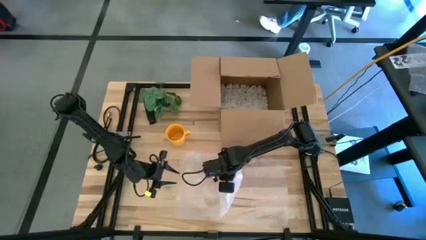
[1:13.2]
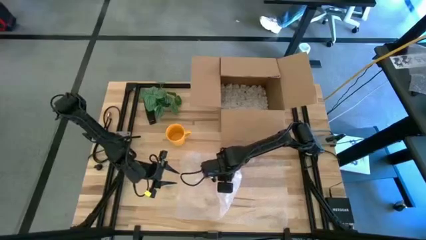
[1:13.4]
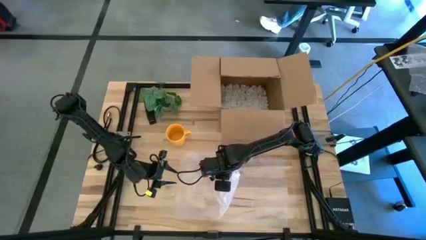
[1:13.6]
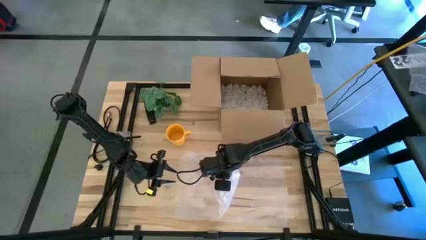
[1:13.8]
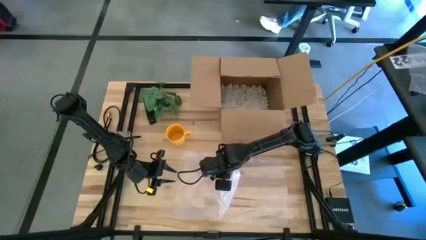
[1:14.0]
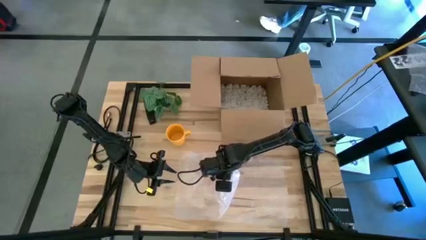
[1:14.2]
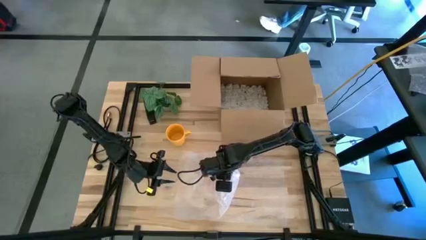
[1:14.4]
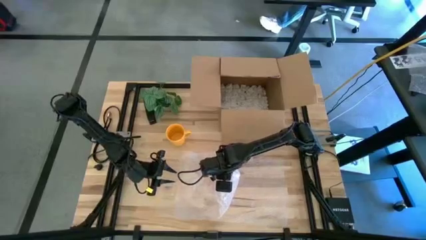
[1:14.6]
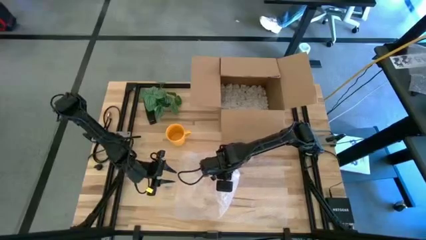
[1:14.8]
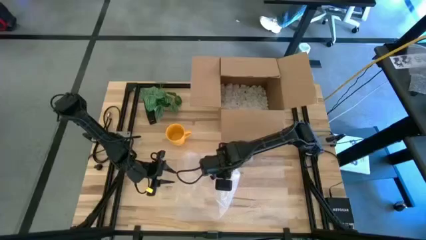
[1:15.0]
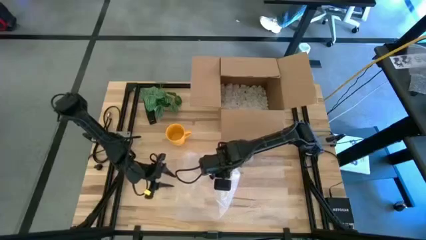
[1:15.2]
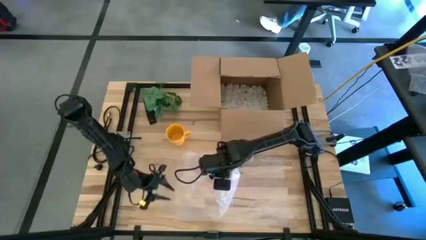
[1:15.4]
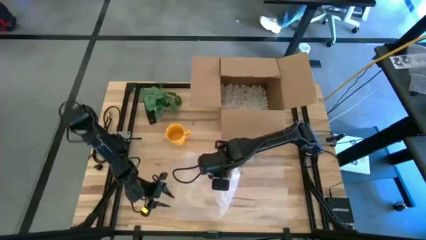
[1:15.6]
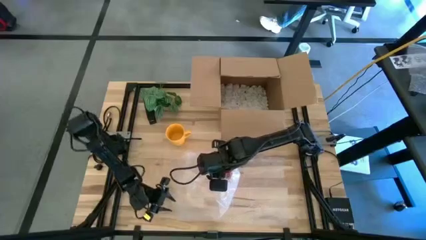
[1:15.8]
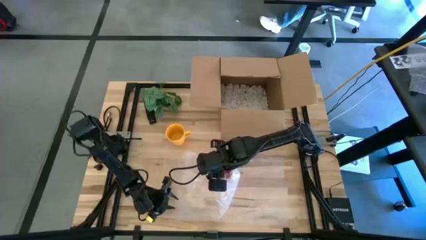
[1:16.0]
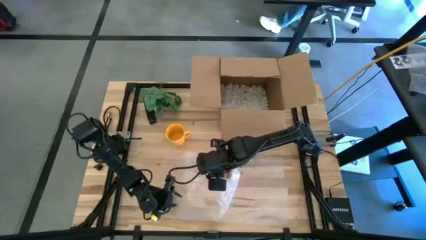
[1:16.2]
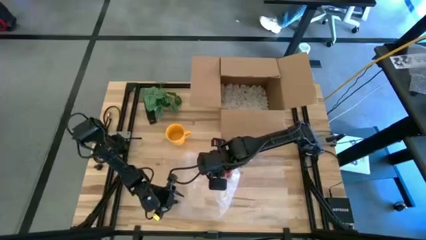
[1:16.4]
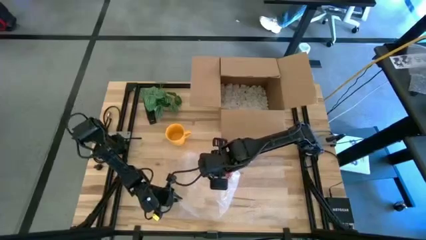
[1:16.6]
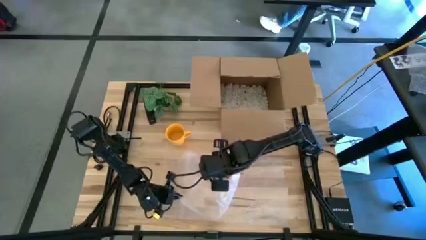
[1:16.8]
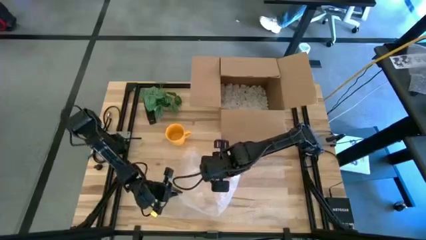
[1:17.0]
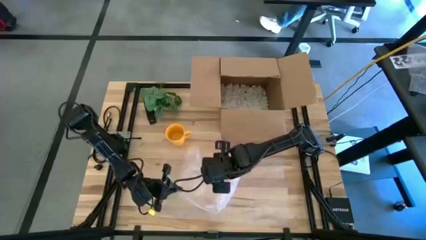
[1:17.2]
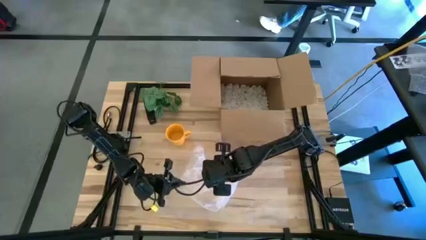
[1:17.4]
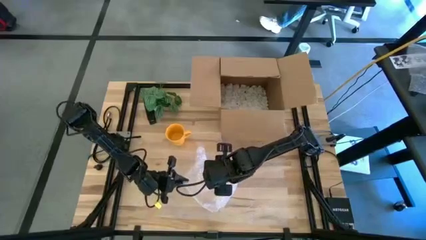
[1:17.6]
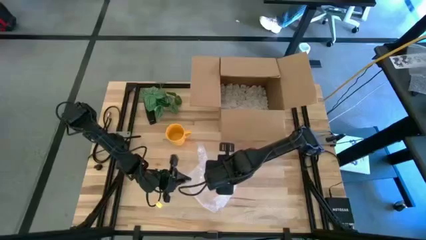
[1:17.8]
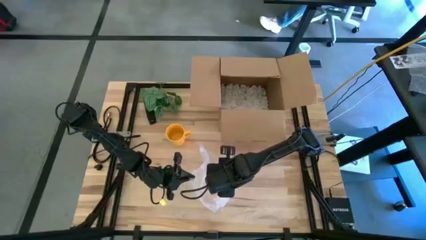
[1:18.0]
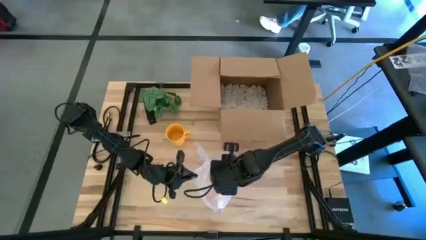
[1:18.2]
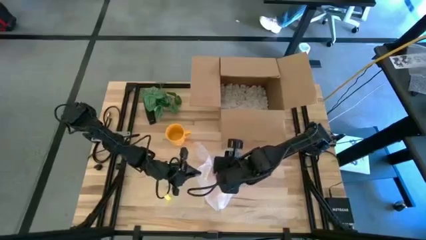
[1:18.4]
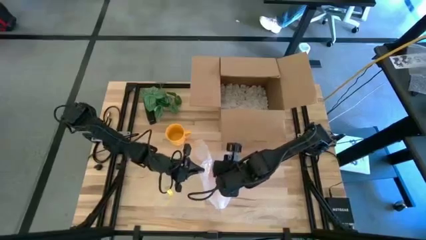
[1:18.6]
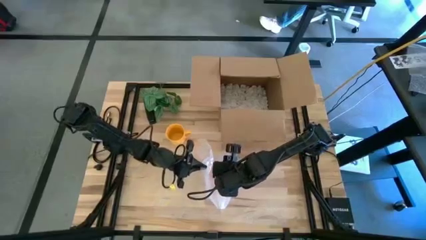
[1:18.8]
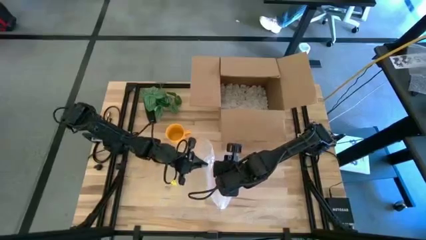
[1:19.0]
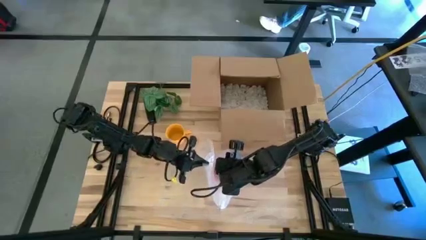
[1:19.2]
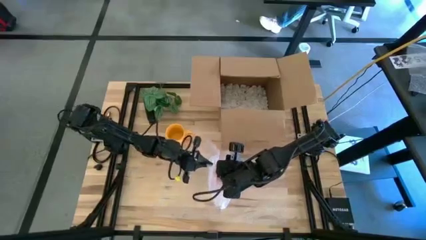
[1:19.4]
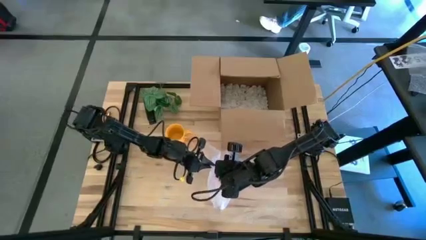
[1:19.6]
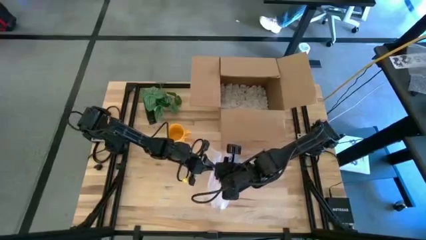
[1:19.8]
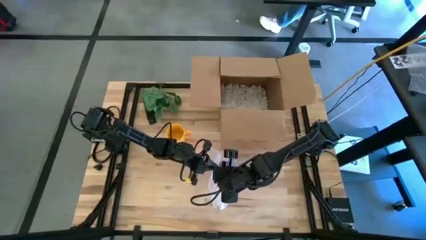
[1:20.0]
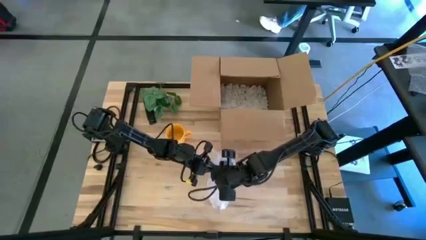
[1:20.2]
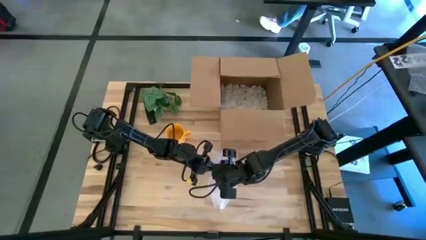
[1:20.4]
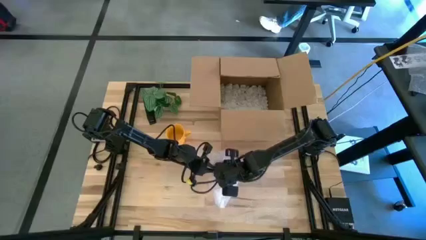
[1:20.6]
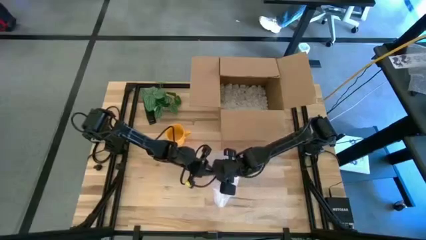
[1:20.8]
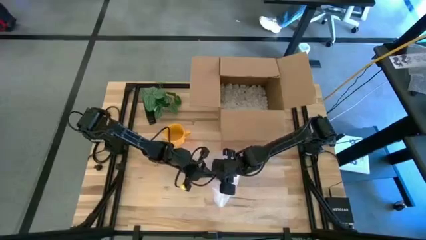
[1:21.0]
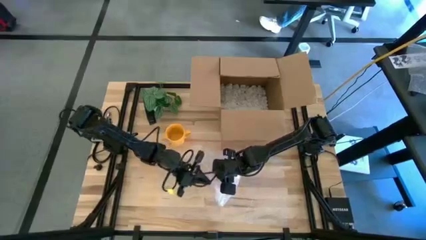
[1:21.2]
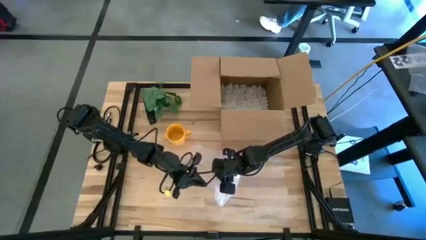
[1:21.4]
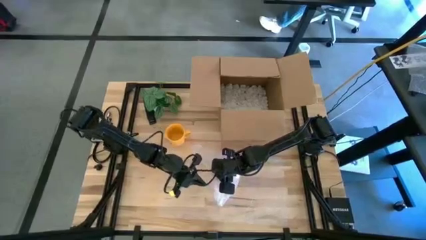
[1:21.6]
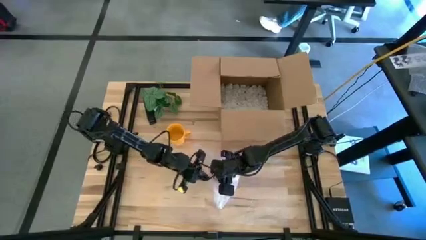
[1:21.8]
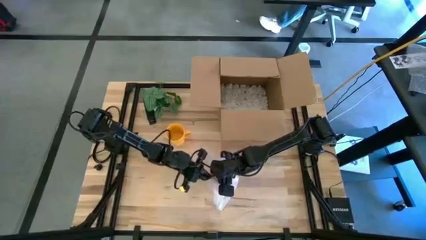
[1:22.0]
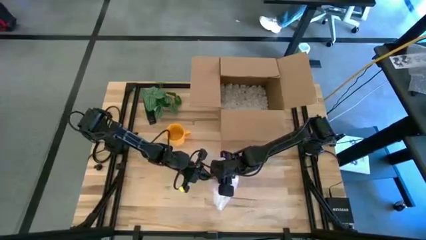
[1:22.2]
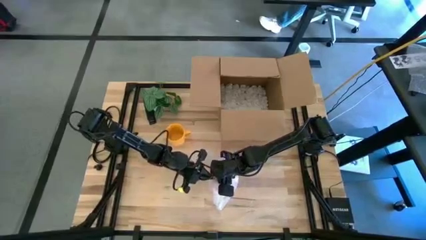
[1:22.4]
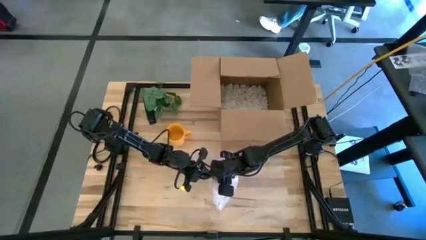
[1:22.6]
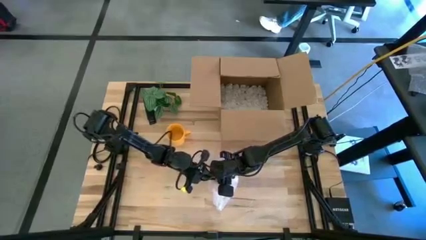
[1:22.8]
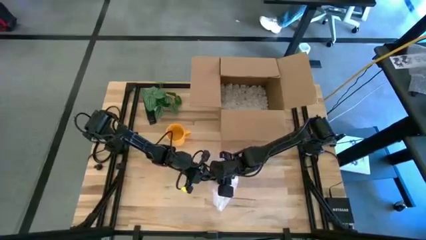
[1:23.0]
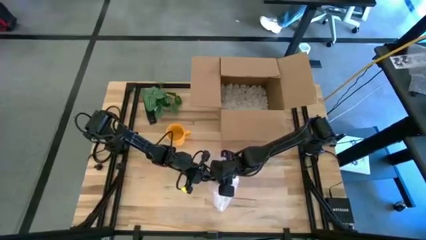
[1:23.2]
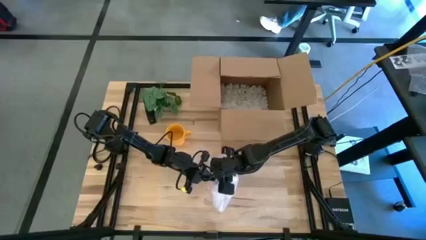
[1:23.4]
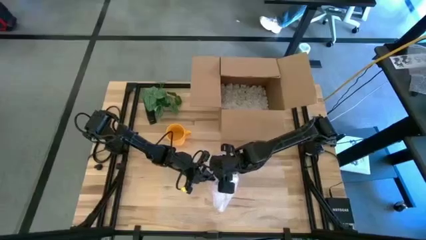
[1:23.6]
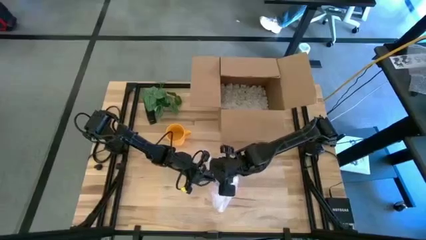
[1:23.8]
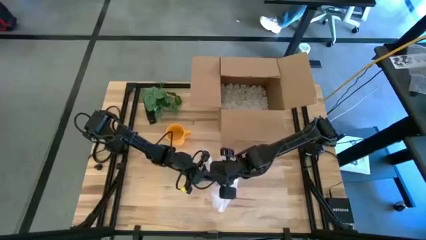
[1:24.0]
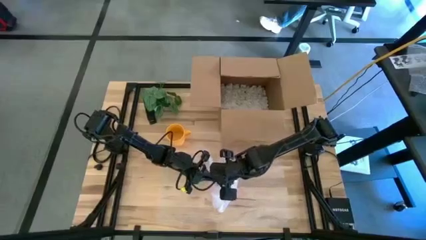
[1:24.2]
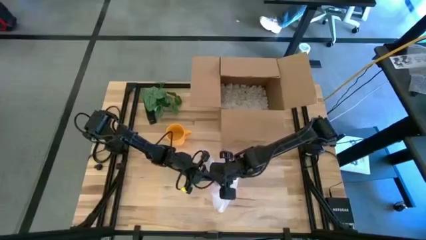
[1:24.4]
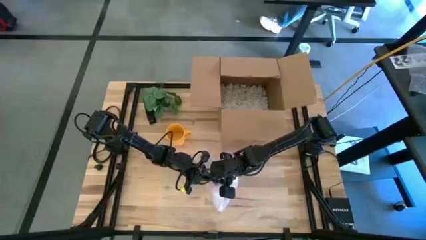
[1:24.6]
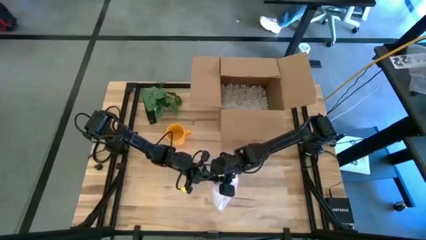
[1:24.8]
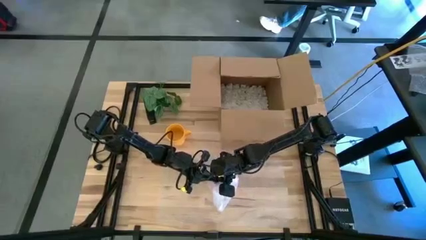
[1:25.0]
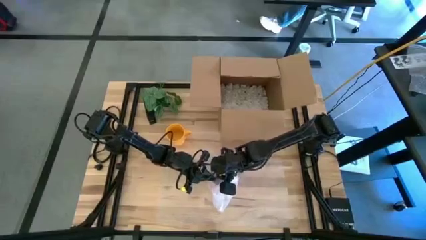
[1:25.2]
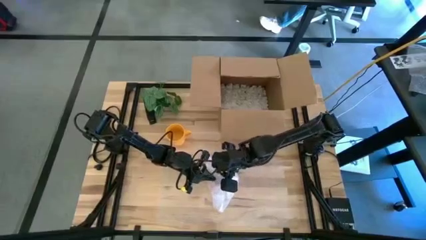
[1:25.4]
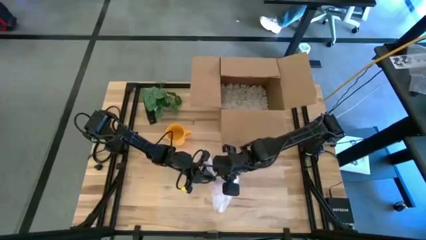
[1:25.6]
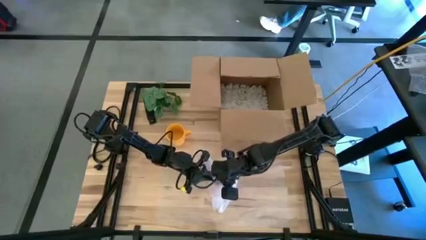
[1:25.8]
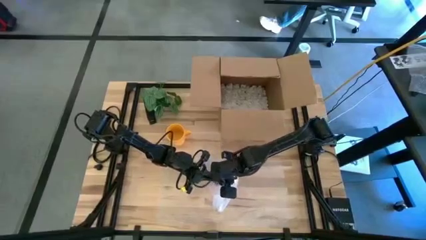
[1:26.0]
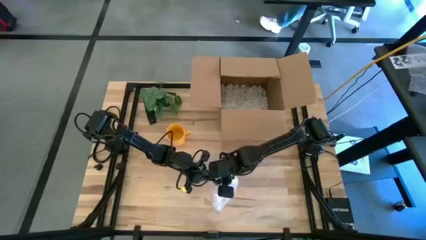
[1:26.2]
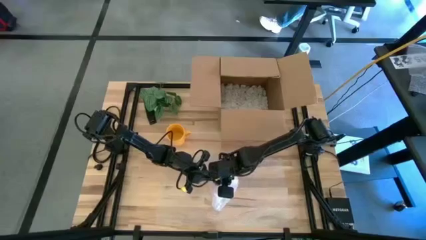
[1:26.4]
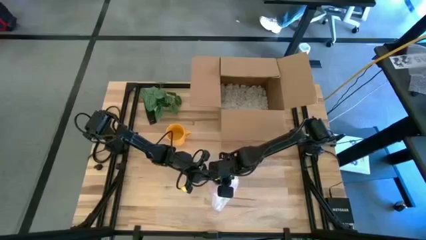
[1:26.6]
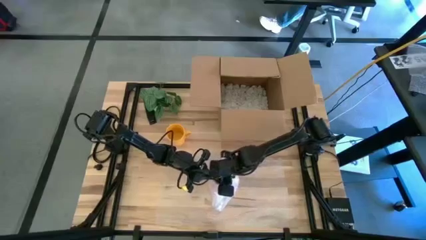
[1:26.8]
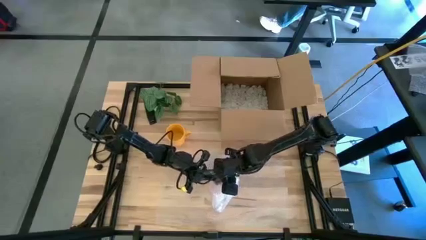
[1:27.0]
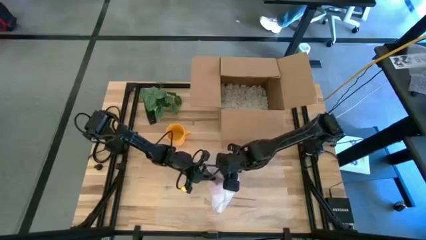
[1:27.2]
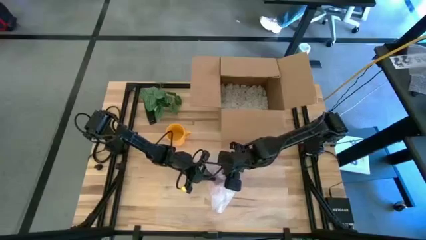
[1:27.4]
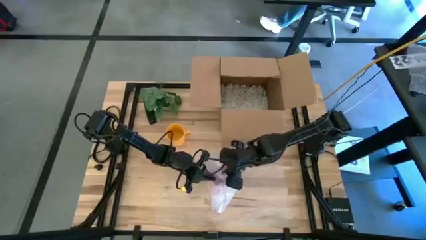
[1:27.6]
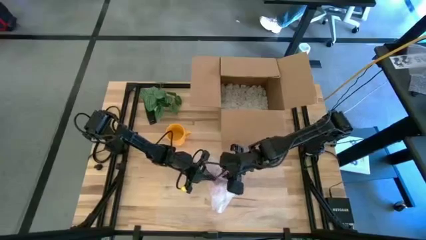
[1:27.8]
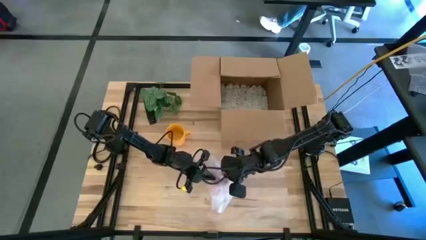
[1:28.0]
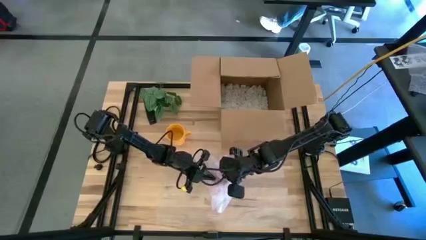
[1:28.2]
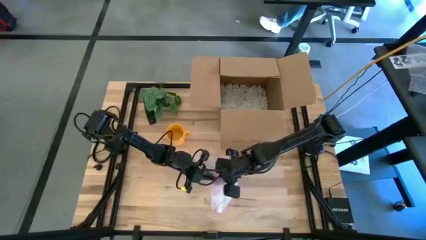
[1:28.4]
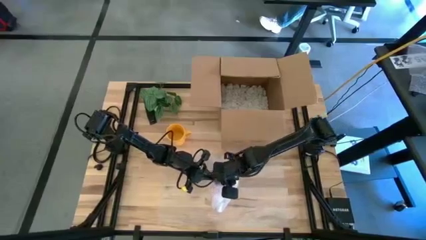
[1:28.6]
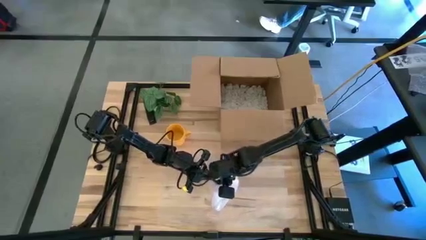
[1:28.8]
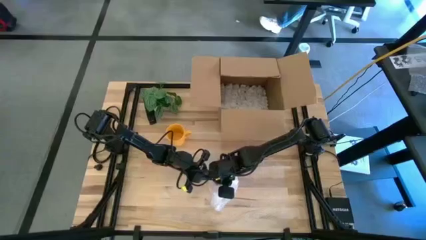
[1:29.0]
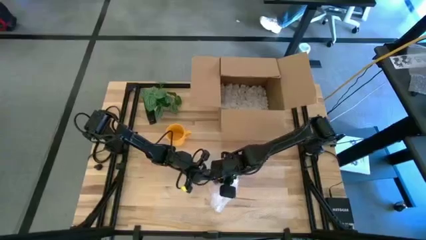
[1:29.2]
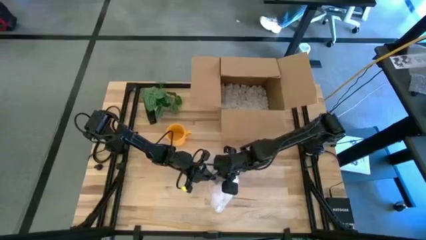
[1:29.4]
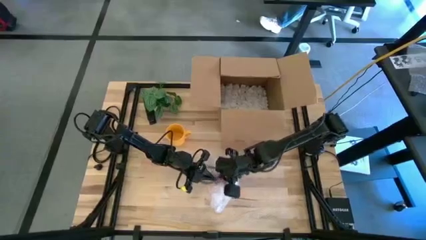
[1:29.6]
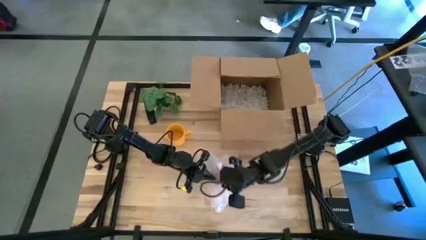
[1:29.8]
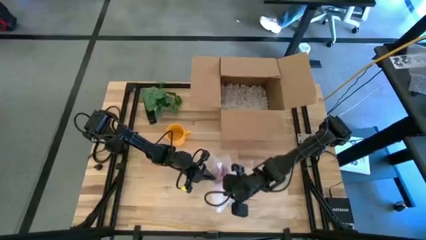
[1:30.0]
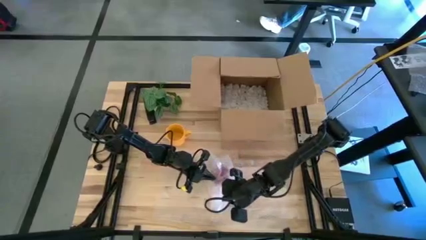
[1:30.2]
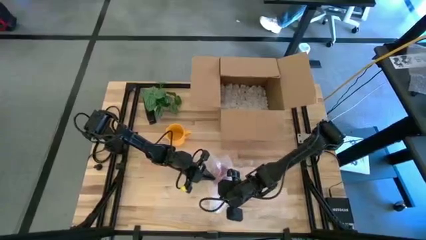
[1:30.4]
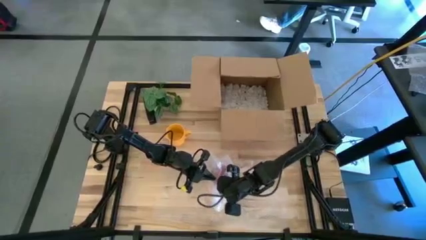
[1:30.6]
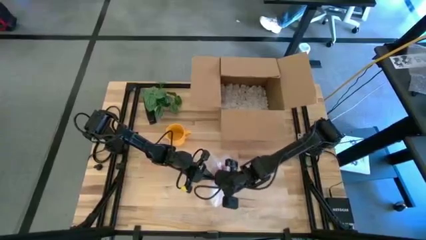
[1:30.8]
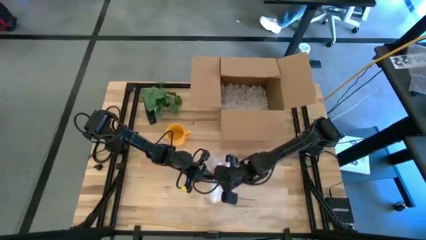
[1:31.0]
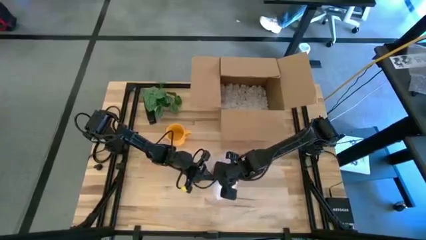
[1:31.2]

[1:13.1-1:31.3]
Task: wrap mug
Wrap the orange mug with the bubble wrap
